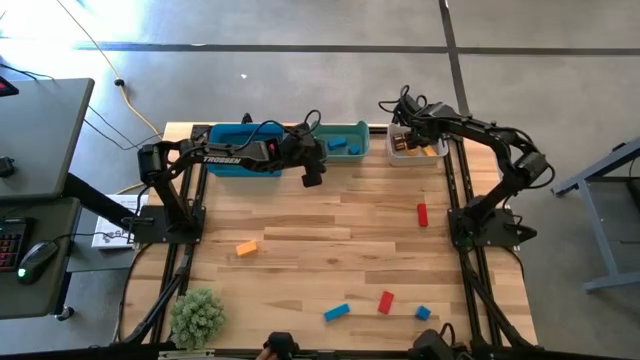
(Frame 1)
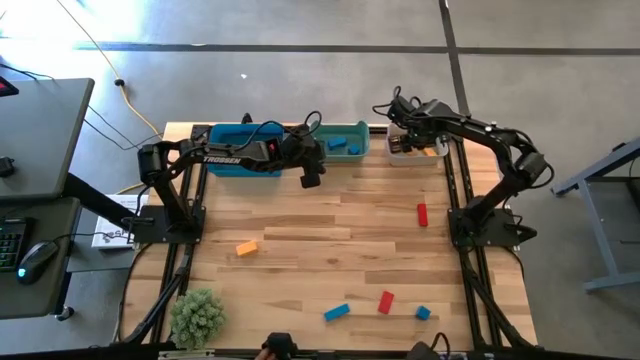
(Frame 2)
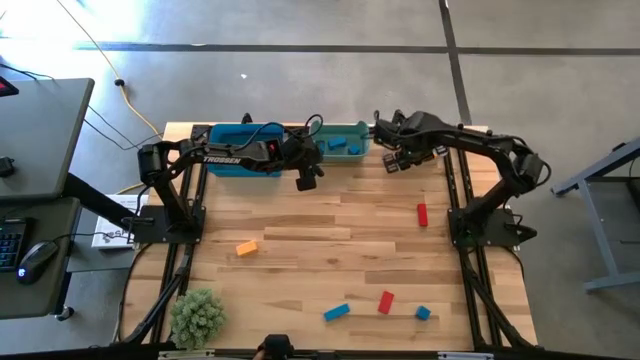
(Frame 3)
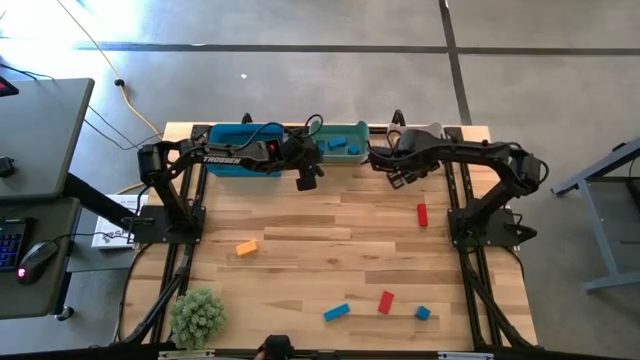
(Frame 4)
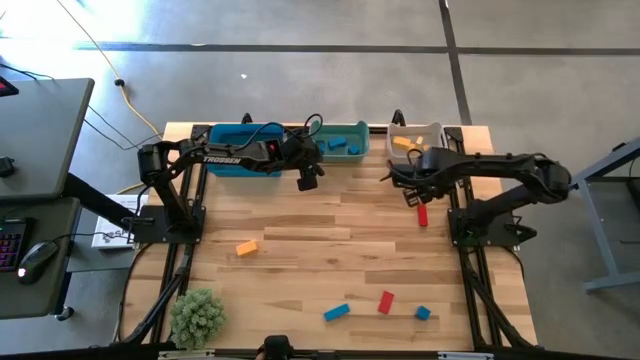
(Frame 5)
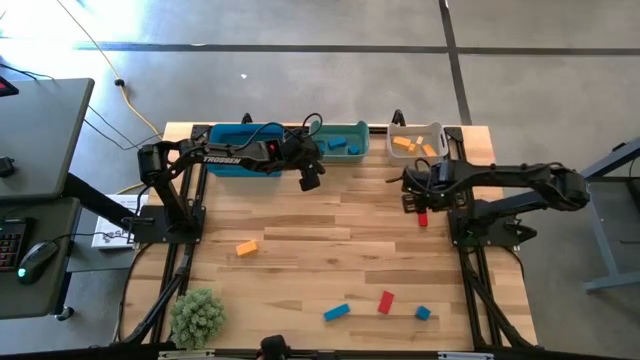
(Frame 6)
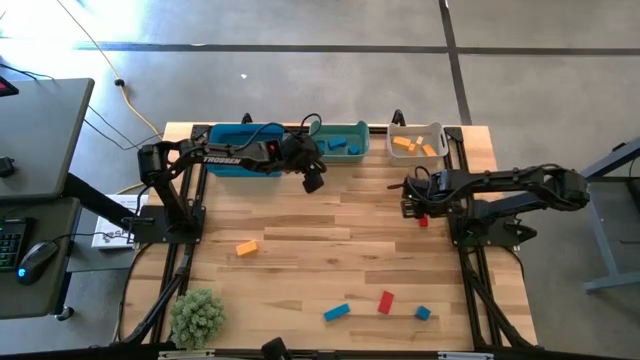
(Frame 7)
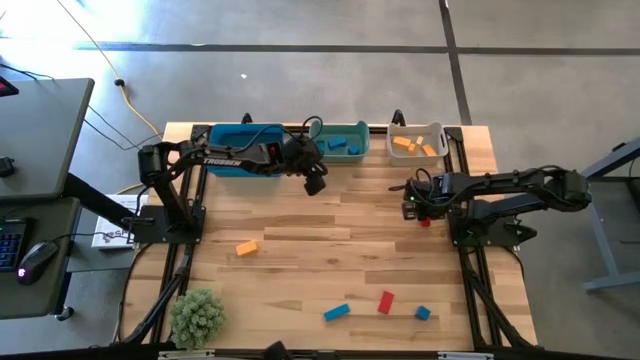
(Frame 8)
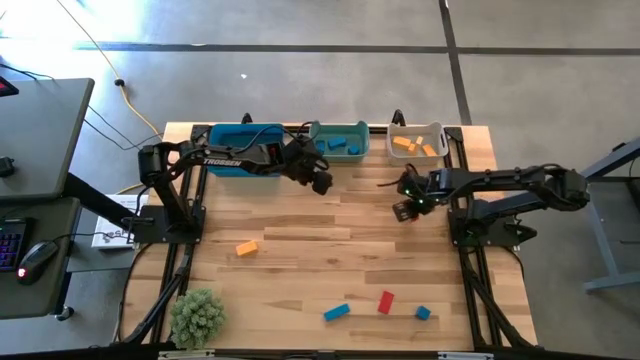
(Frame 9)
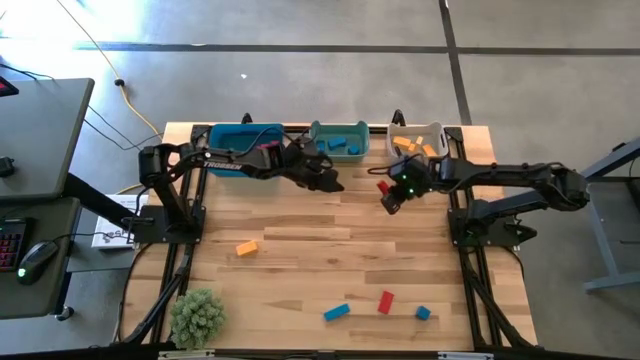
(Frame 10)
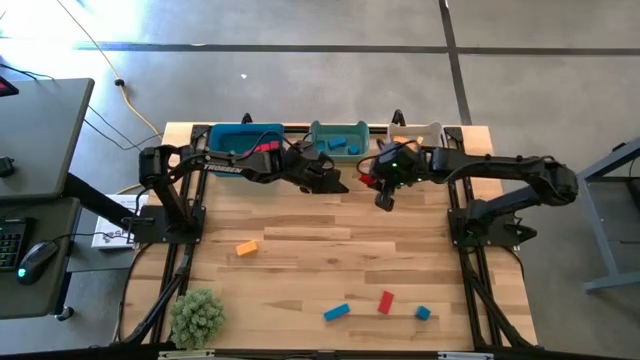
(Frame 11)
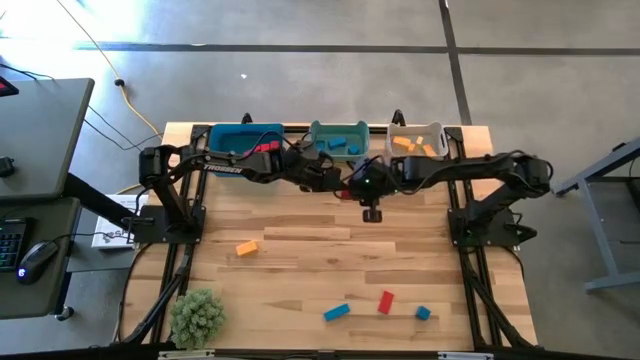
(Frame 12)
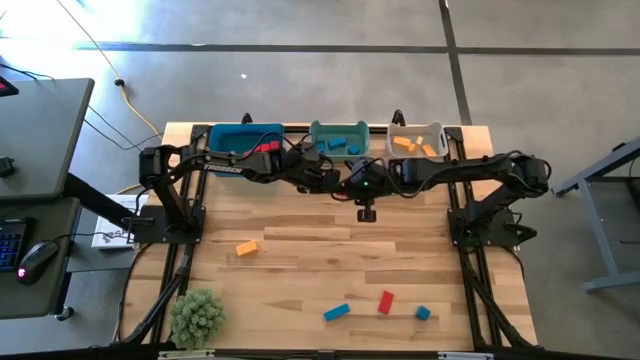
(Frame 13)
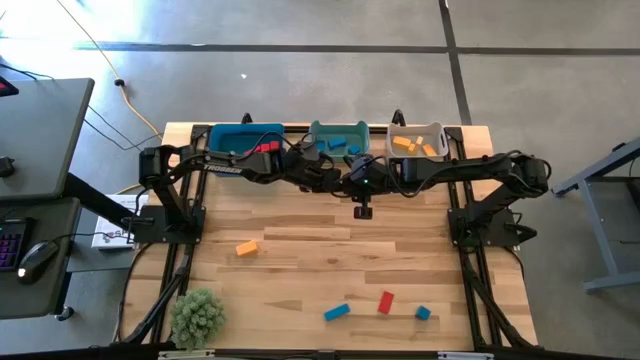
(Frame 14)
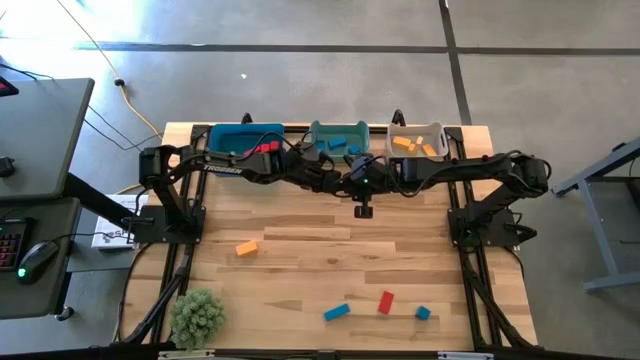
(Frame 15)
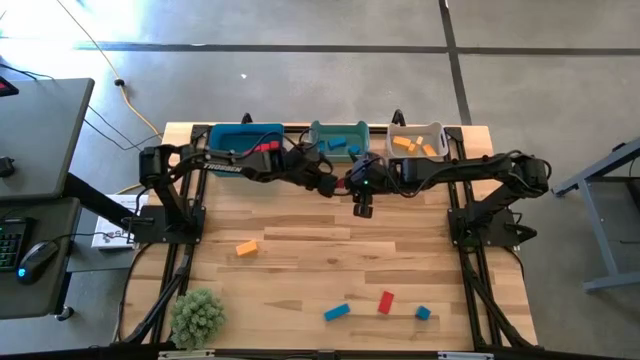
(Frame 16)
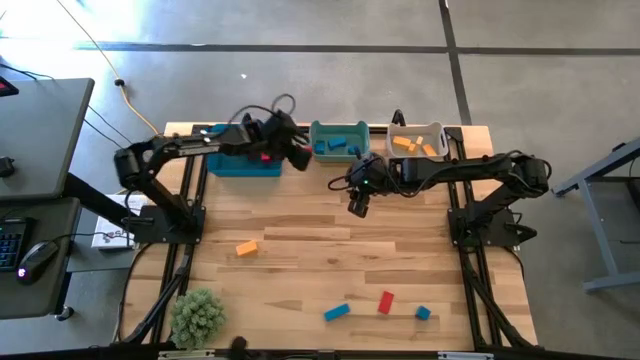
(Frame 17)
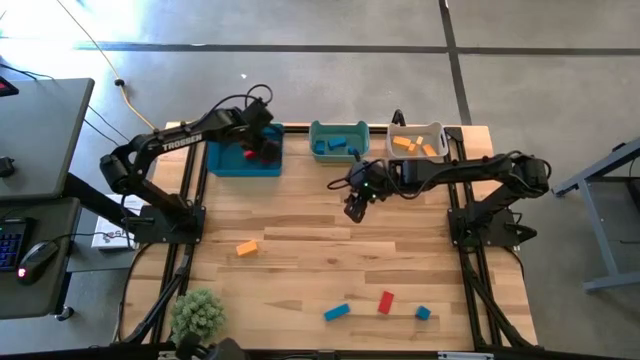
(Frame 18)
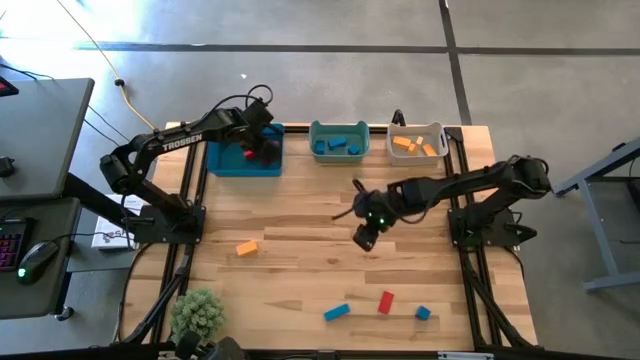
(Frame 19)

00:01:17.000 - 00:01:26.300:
Task: Sort & place blocks by color
Put the red block into the blue bin

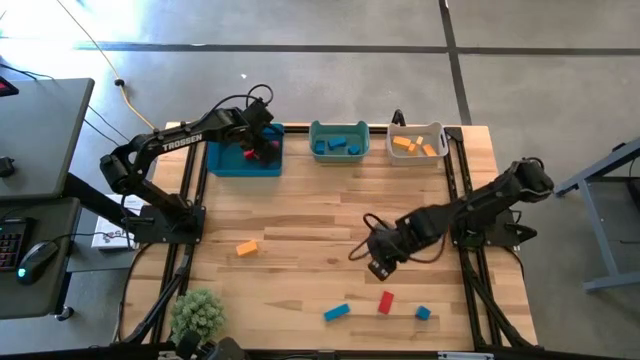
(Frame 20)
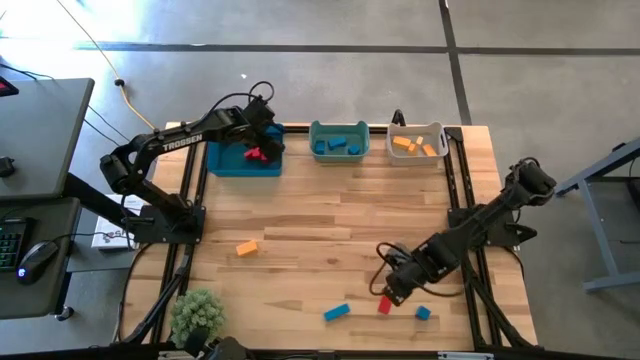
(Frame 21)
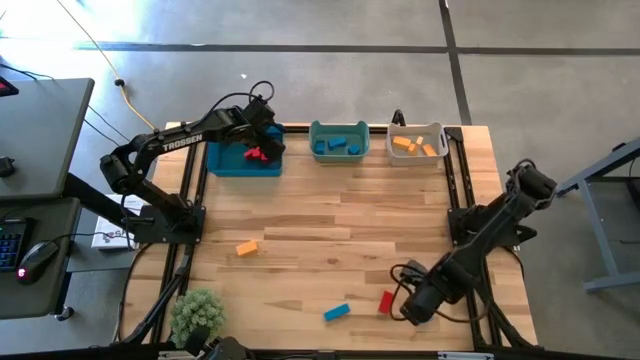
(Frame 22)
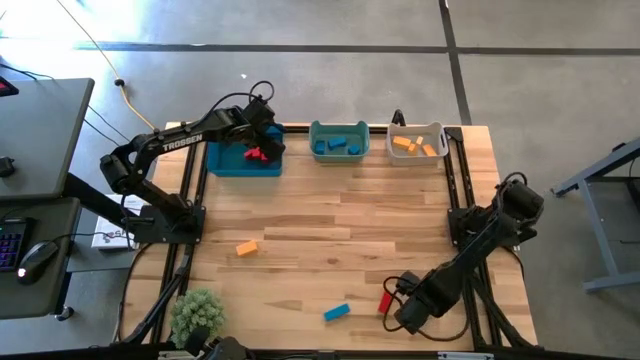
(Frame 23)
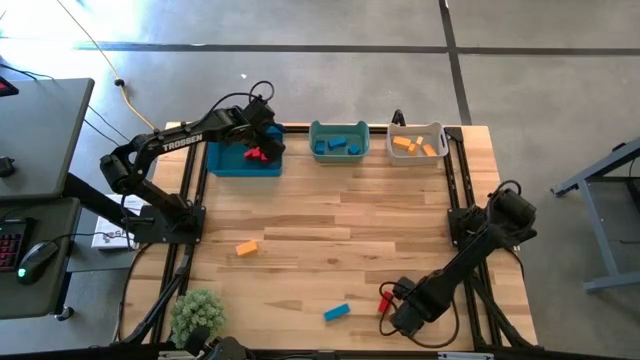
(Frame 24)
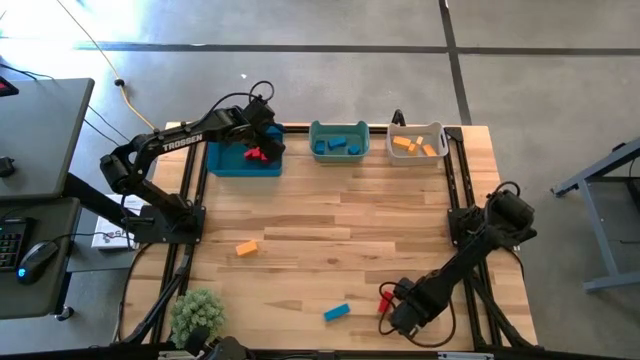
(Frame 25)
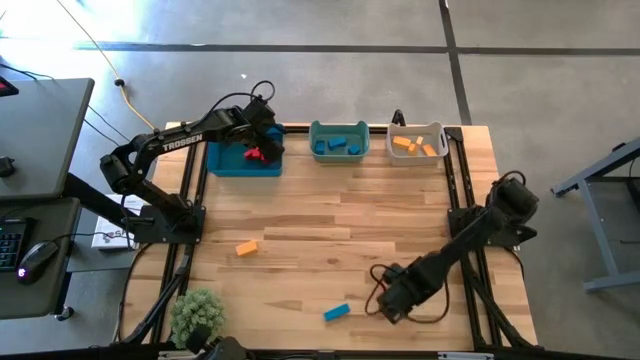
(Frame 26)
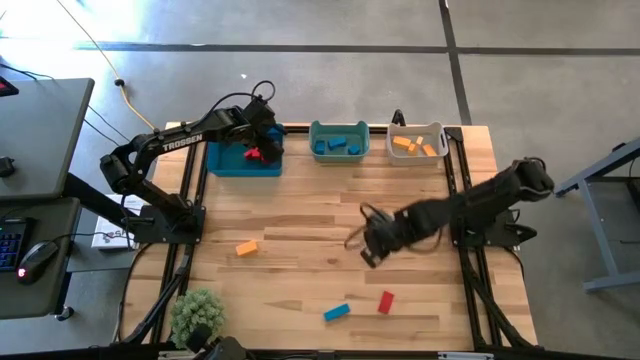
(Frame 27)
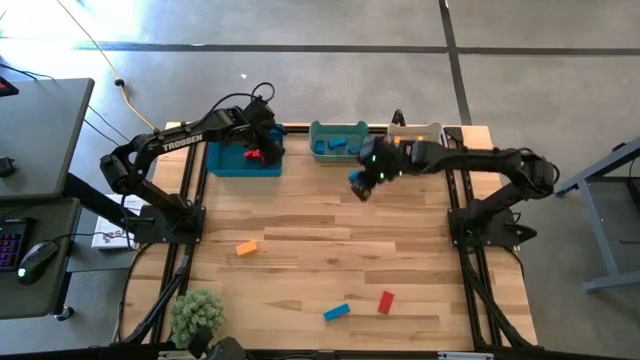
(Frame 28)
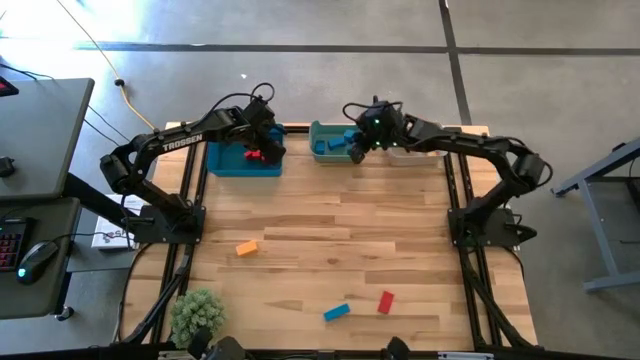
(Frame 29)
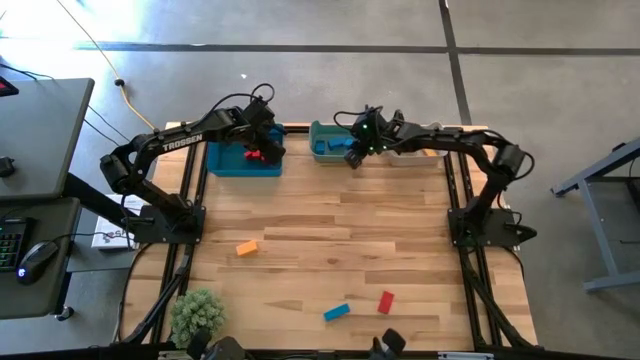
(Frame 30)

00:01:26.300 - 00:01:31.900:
Put the blue block into the green bin

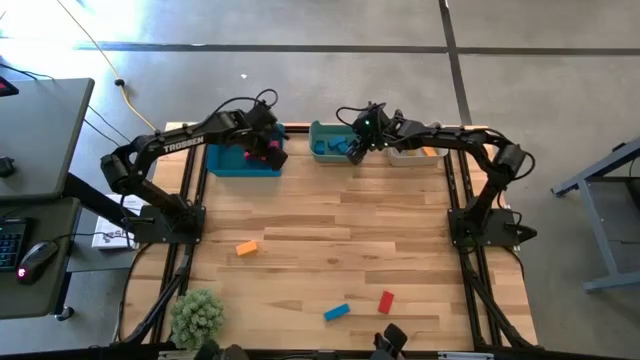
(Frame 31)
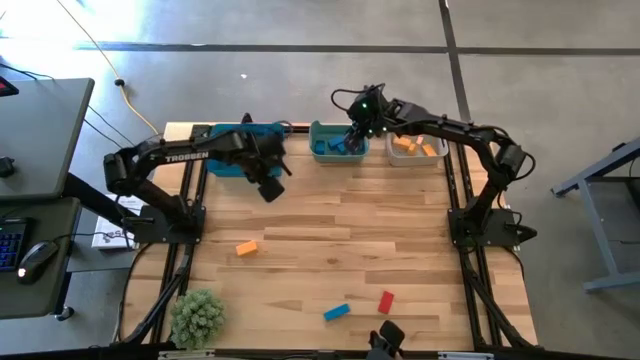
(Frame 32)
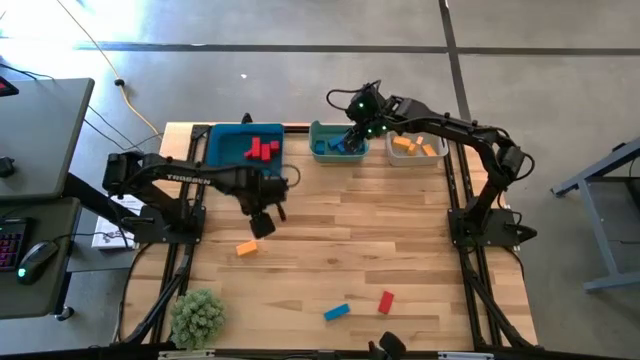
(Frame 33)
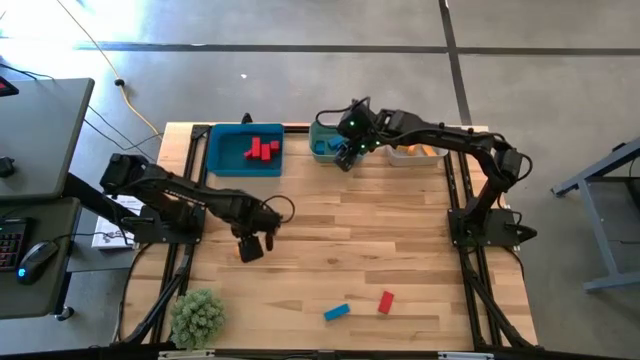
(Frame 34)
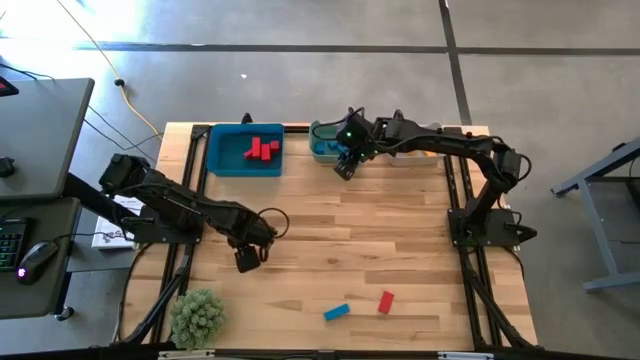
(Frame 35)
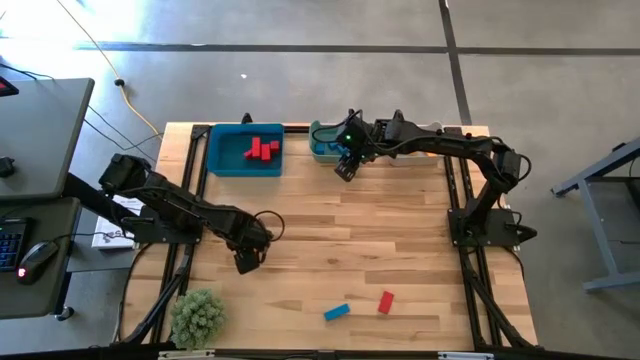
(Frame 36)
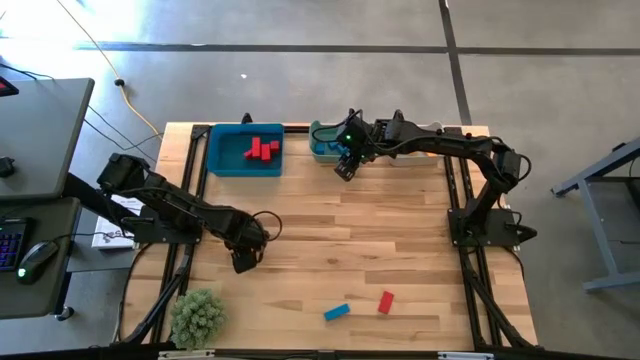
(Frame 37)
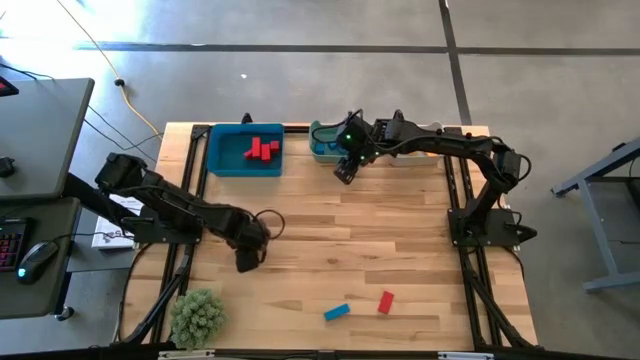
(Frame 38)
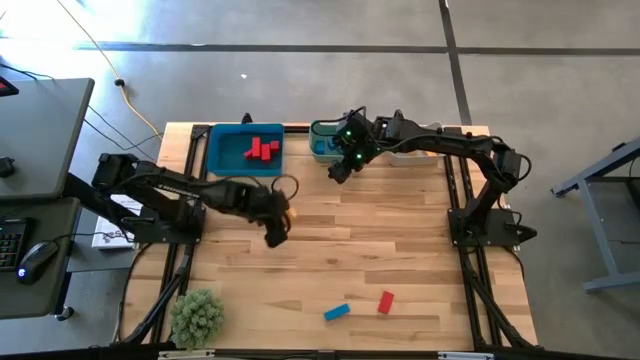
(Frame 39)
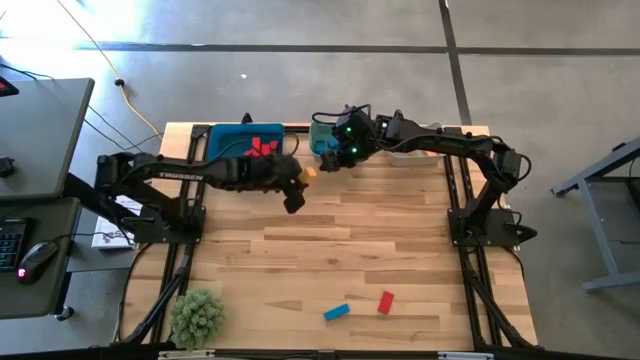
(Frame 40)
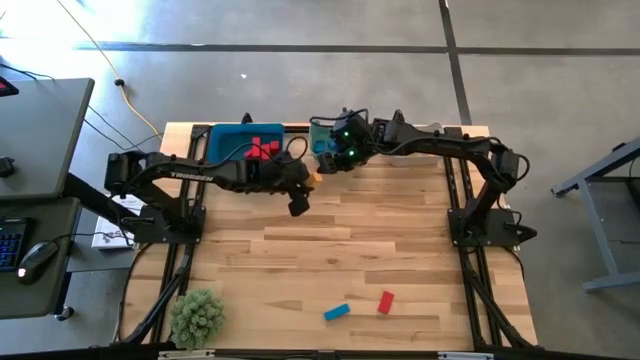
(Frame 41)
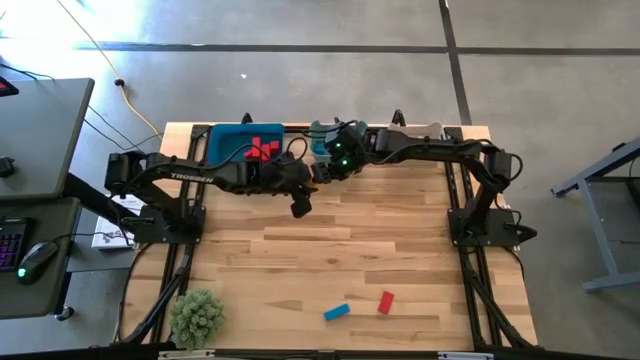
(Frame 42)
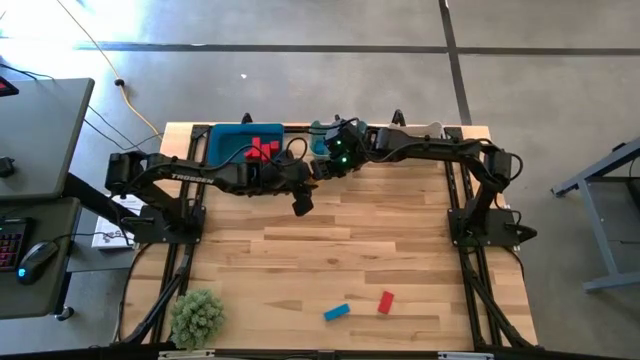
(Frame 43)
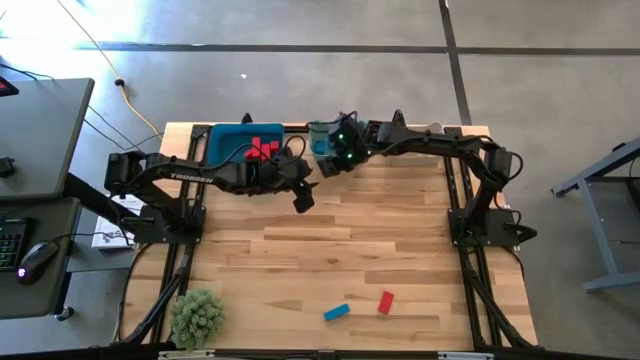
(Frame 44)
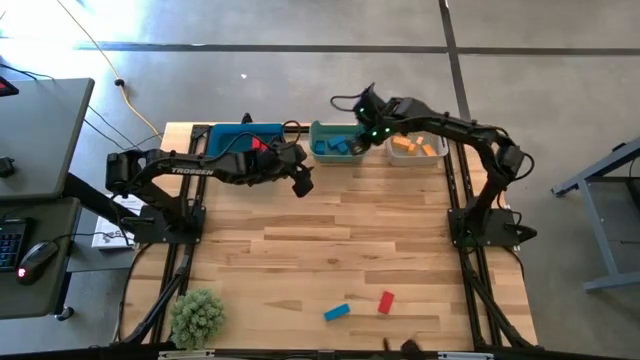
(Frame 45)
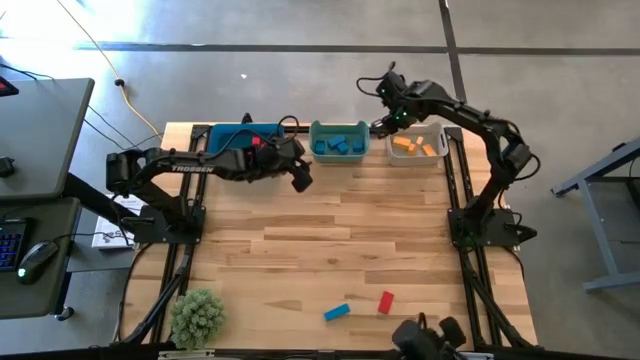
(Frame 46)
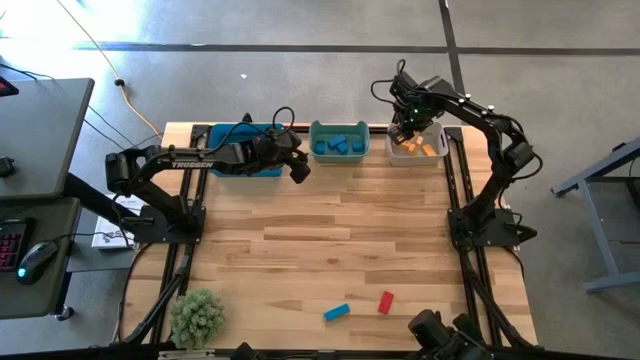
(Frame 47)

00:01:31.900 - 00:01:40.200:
Put the yellow block into the gray bin
